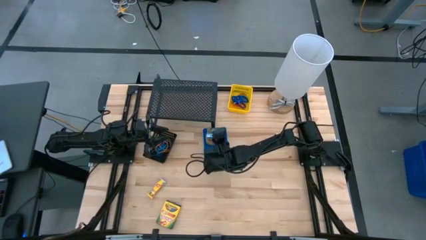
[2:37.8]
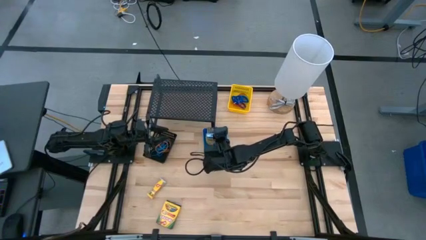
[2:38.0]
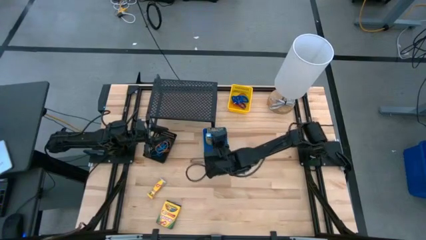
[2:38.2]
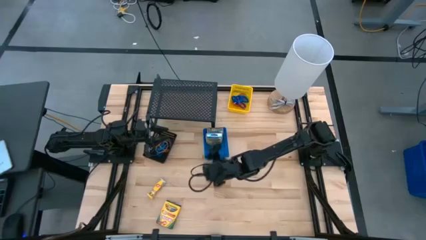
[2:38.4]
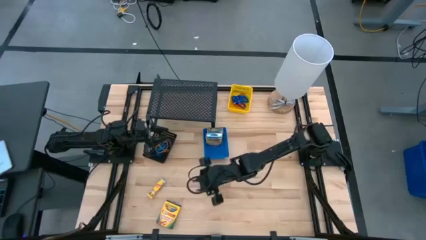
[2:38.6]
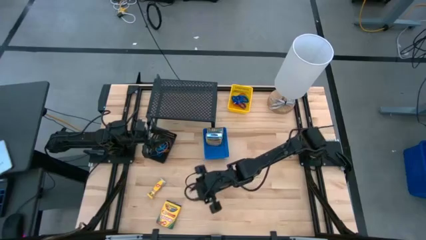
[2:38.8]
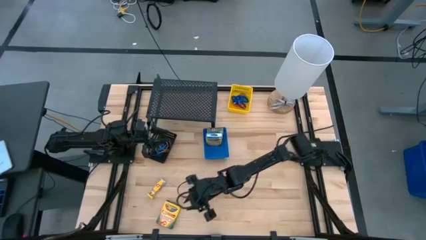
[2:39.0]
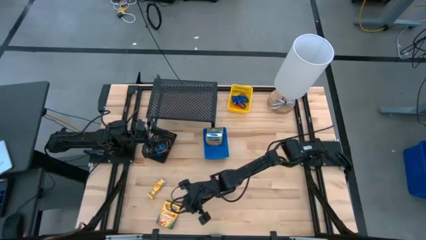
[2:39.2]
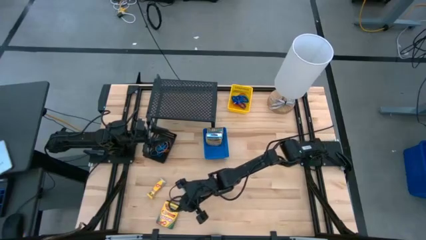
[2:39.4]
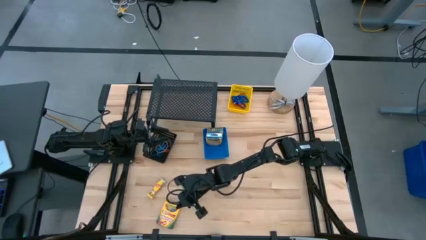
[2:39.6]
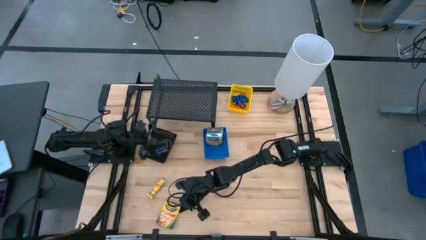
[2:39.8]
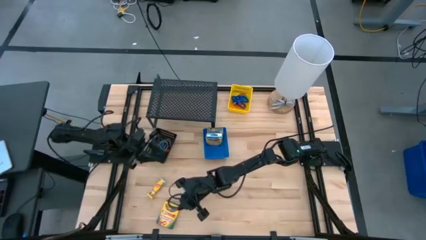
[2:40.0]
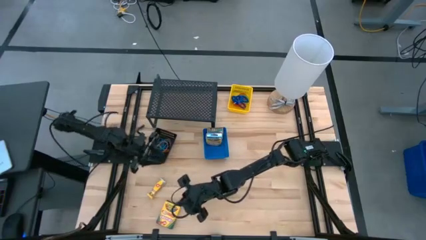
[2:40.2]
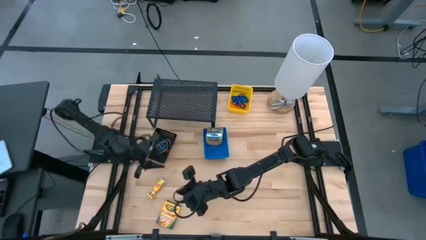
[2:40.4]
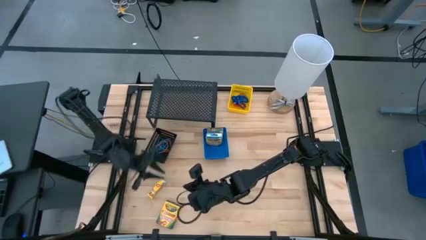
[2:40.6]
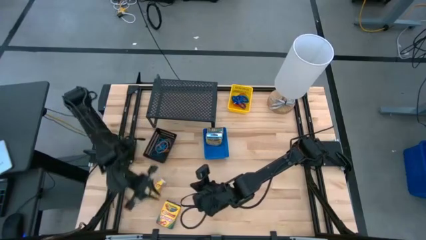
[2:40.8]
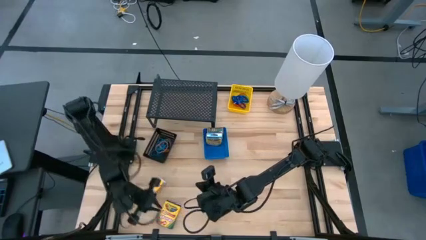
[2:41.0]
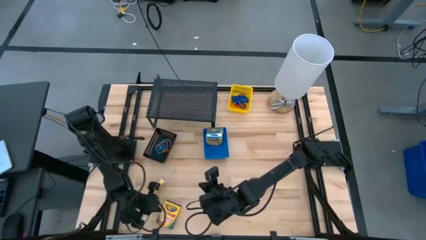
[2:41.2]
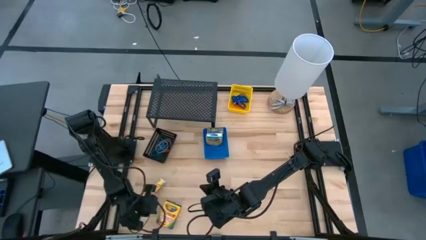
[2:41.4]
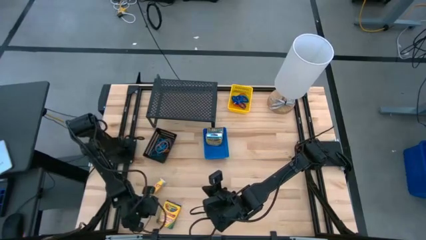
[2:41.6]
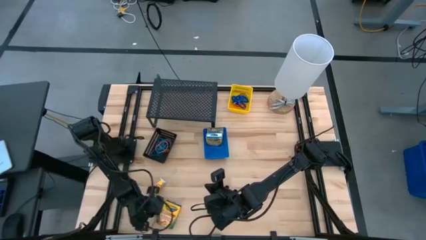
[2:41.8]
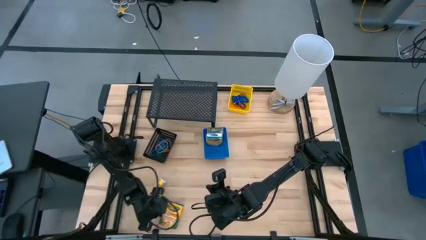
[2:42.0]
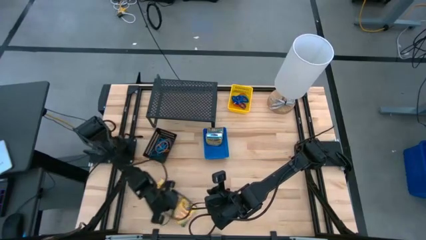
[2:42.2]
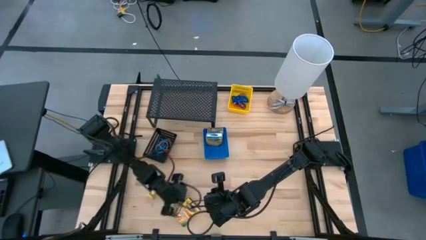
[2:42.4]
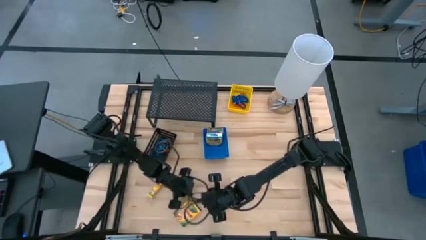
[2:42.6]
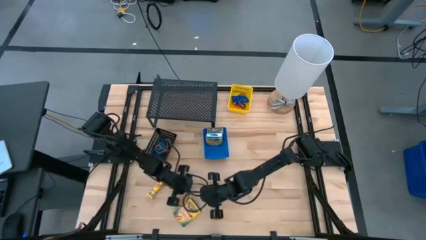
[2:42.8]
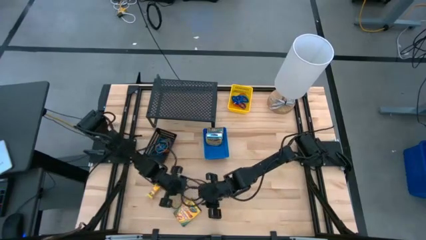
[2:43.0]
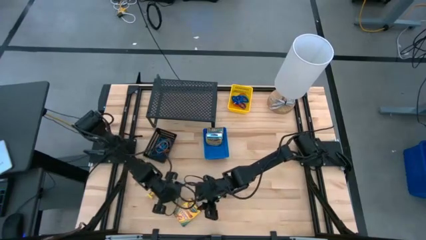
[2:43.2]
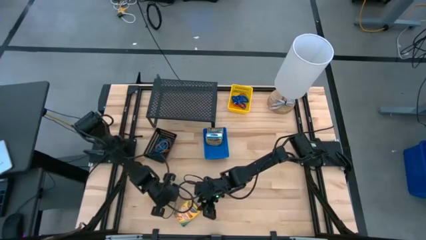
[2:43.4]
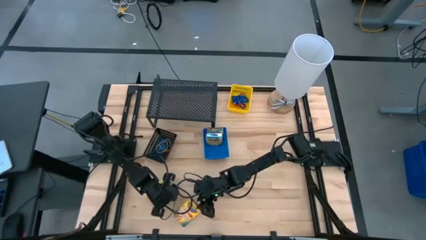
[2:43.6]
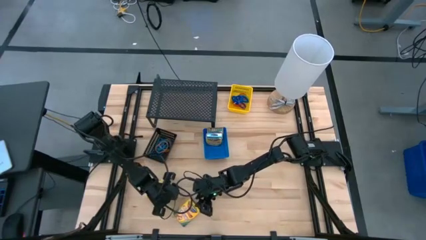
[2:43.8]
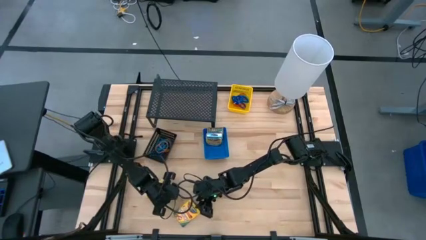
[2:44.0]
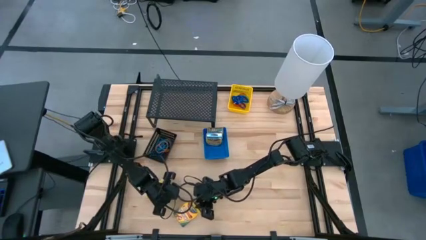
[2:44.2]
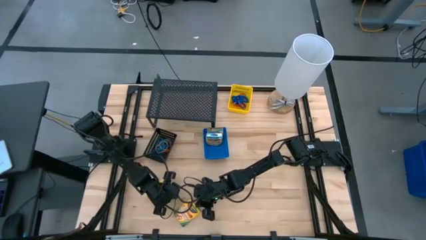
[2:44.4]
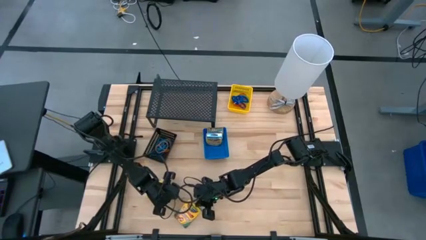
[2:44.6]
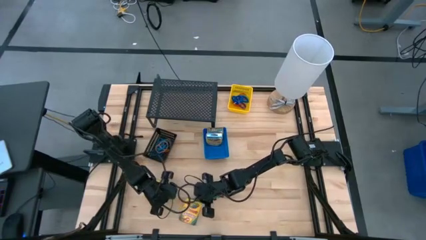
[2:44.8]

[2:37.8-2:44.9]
Task: Pick & Place Office Desk Supplies
Put the large yellow crayon box into the blue bin

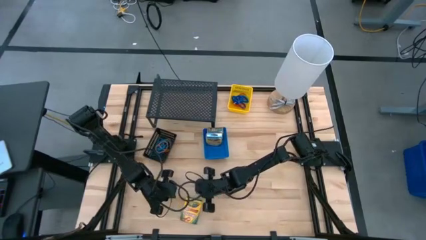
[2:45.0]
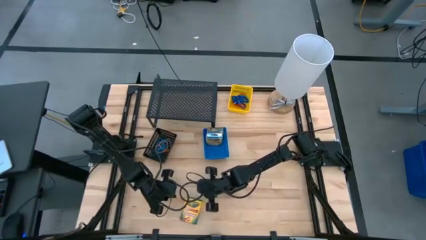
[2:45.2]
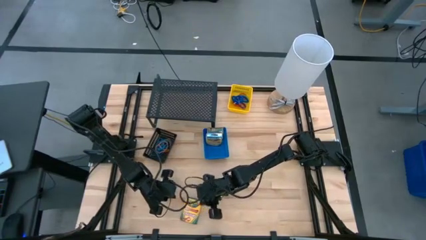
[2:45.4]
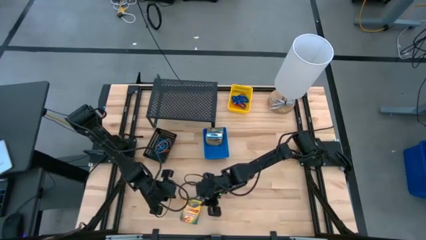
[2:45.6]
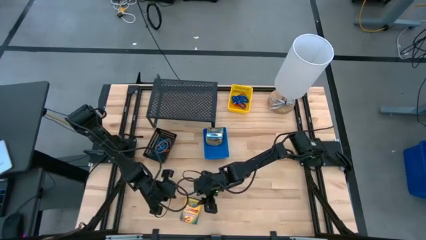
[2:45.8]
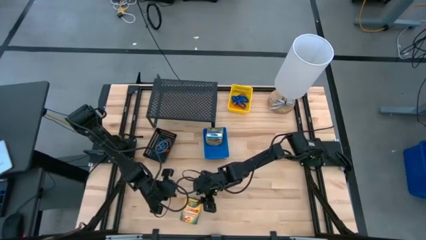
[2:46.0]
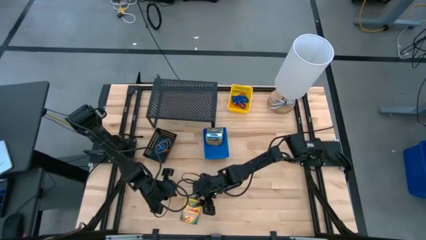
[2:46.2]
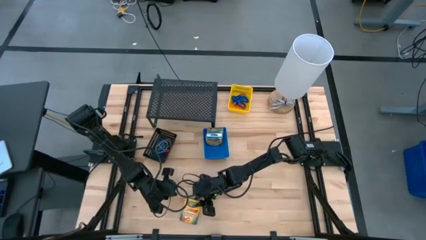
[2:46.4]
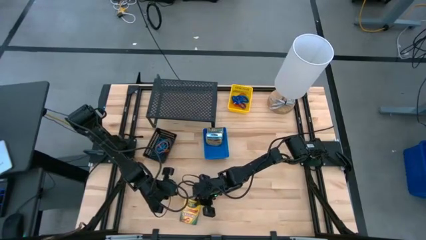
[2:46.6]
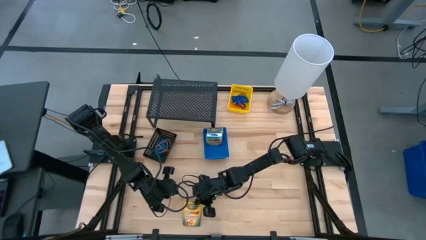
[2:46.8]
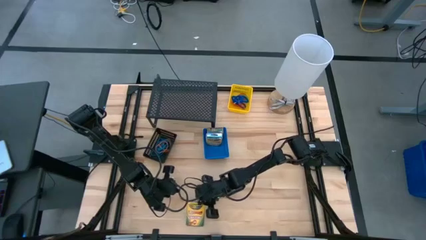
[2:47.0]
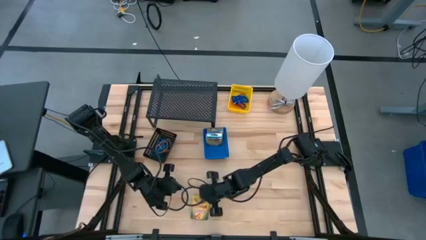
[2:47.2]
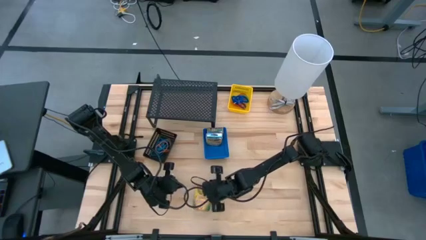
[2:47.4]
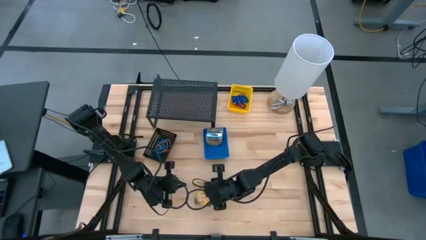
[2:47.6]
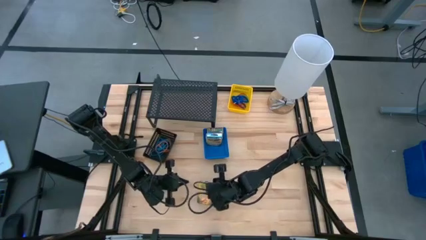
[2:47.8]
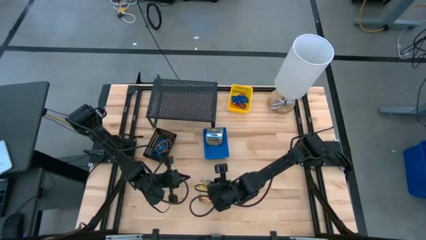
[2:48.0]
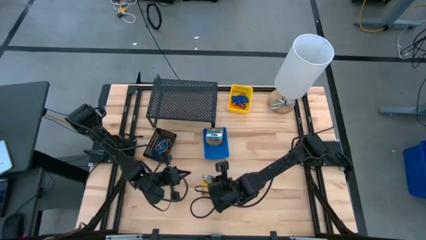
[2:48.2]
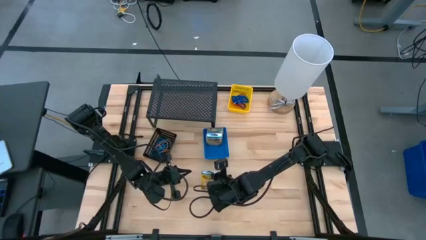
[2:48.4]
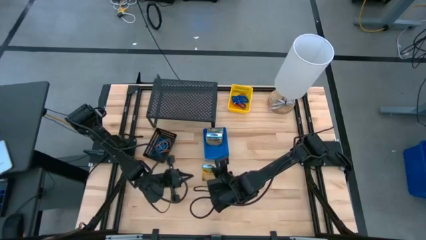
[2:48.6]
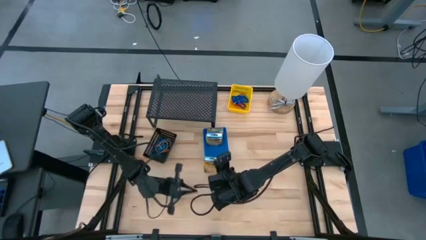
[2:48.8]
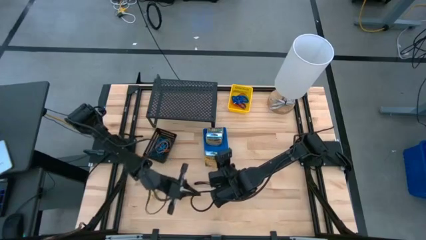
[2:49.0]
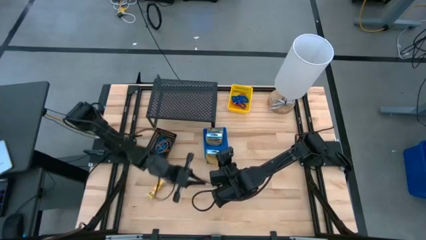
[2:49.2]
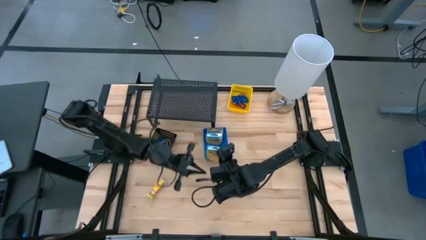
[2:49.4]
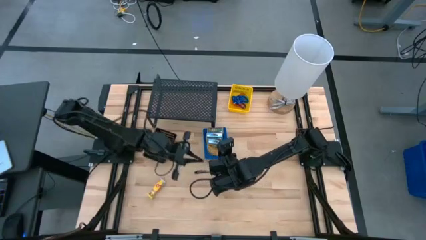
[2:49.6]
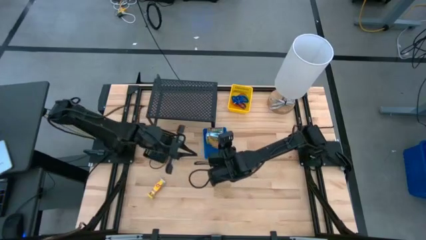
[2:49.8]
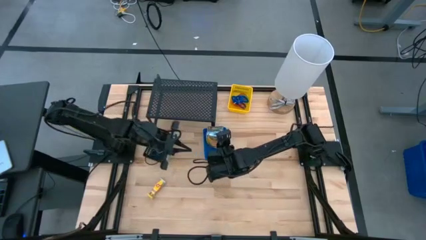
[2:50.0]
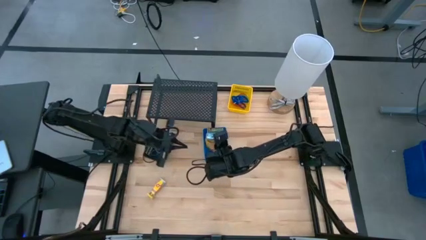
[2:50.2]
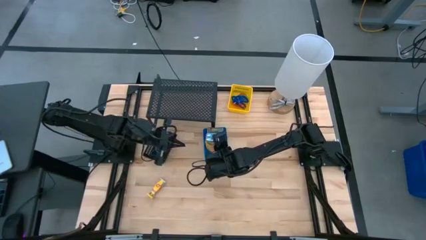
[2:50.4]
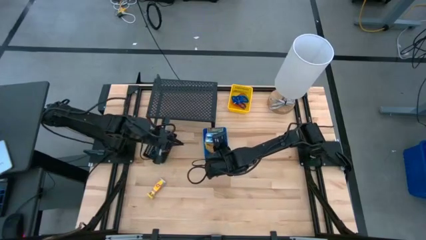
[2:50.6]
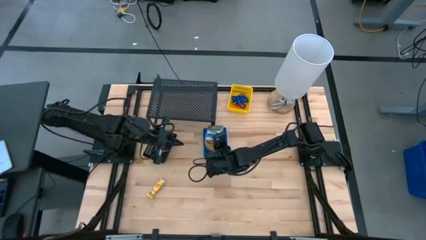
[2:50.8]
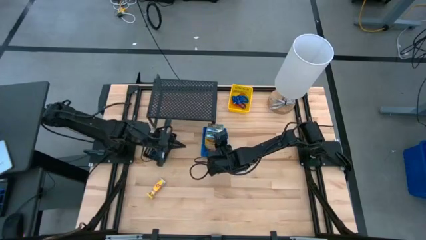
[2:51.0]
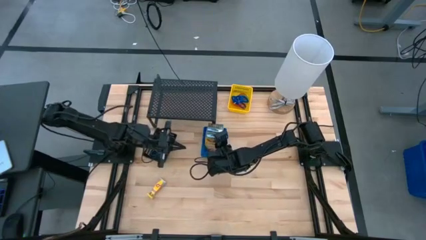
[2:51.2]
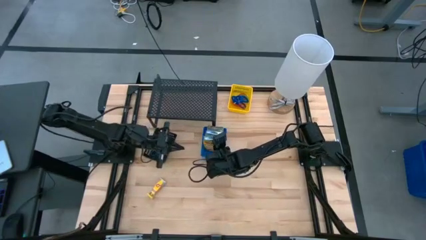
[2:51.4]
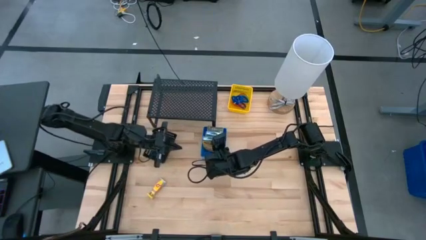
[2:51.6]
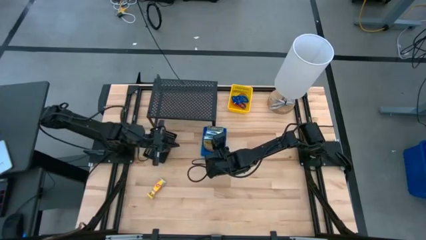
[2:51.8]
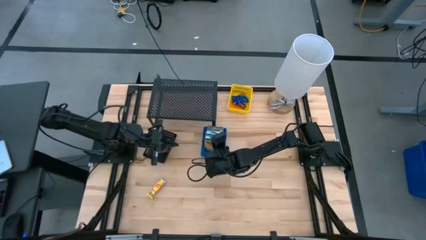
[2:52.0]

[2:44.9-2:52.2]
Put the large yellow crayon box into the blue bin

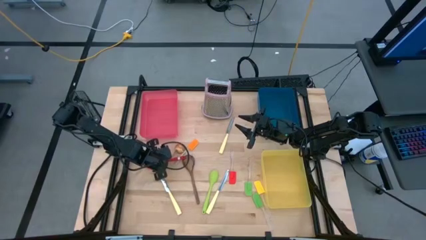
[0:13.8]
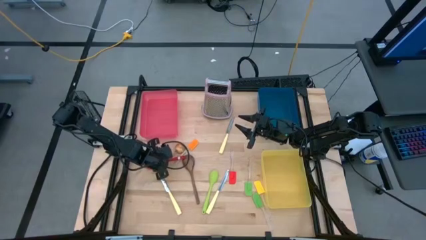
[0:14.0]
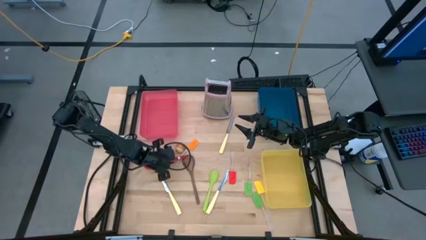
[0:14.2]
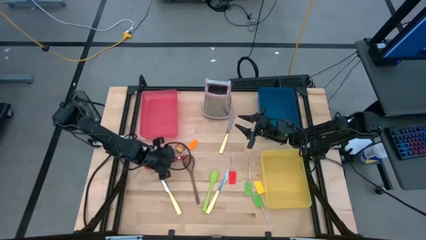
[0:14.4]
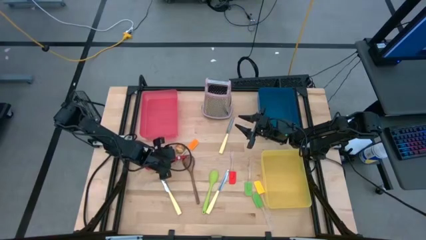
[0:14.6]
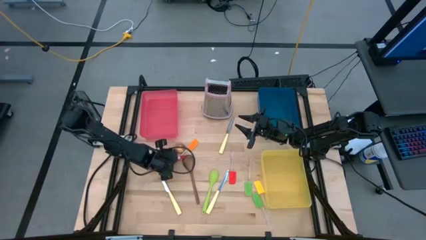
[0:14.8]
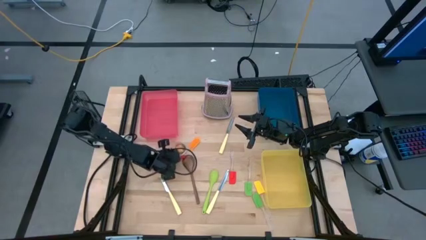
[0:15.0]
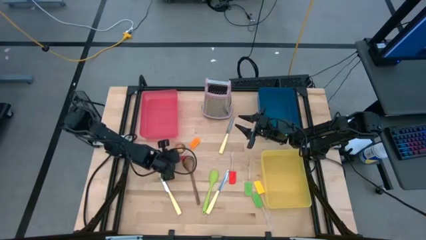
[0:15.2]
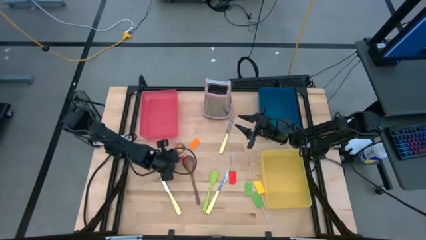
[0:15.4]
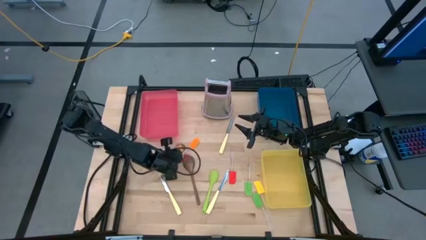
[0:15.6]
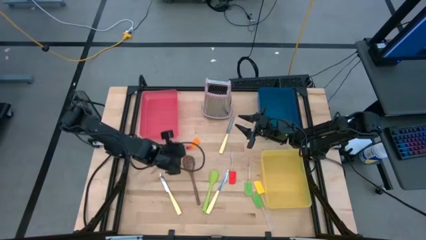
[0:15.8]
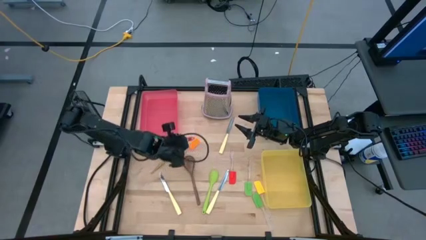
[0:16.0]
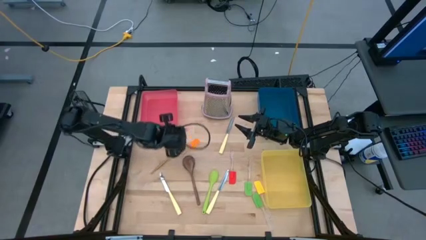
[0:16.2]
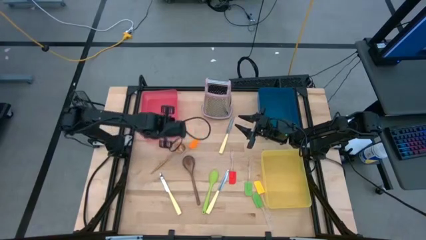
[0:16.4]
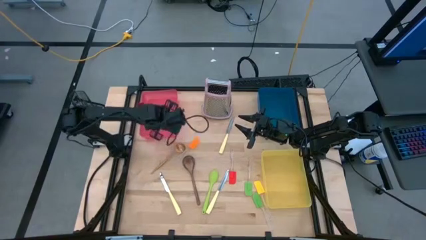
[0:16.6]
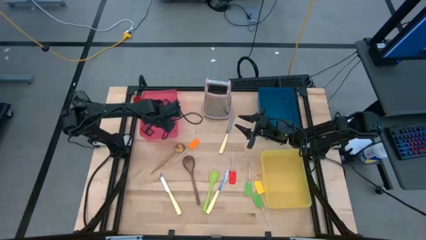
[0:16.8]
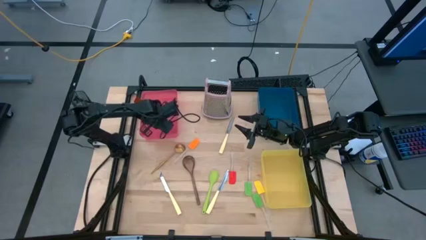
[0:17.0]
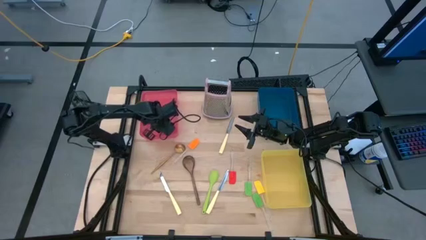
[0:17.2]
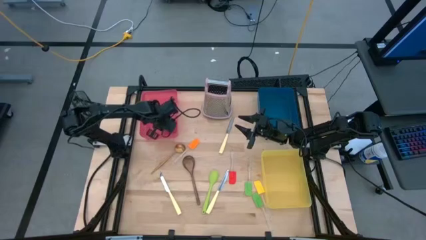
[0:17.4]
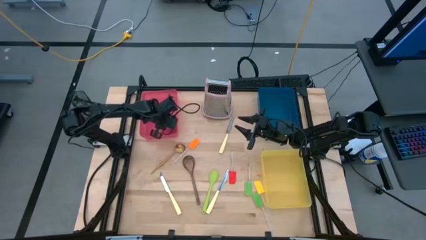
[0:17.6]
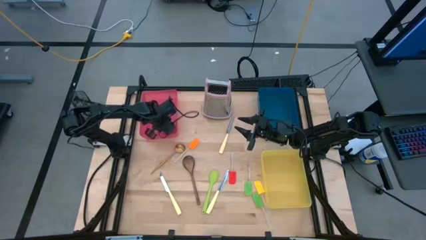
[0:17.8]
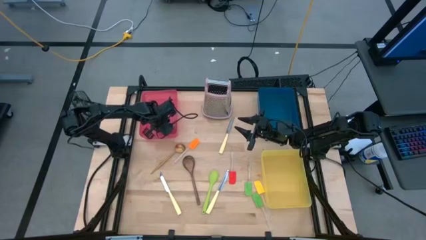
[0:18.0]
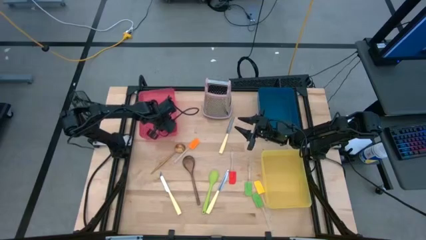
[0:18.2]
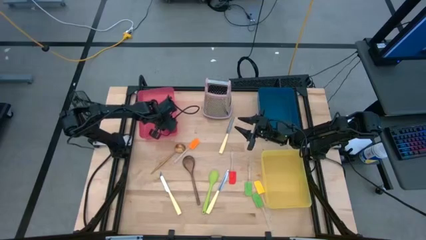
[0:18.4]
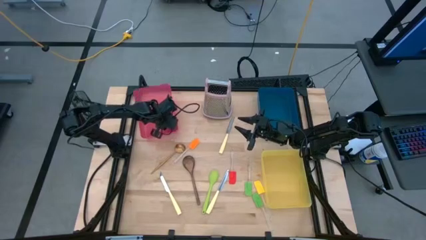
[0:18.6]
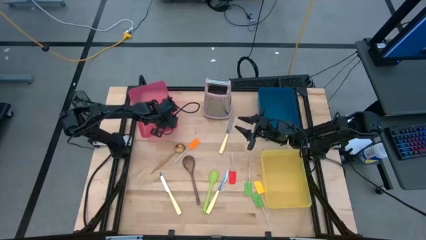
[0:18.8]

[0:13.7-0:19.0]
Task: Pick & Place Kitchen Items
Put the red serving spoon into the pink bin
